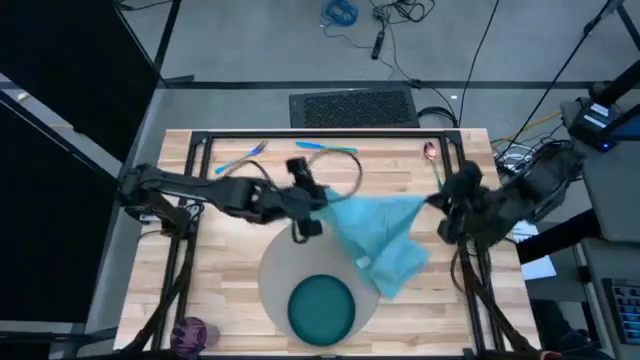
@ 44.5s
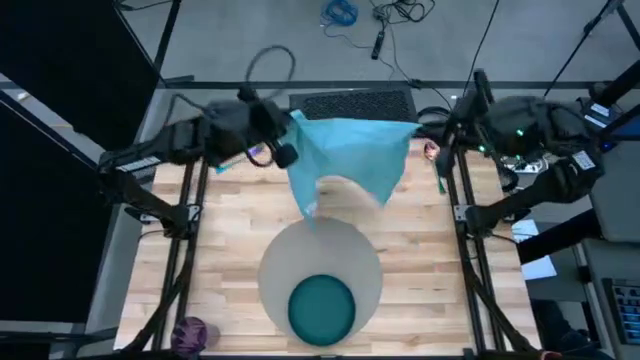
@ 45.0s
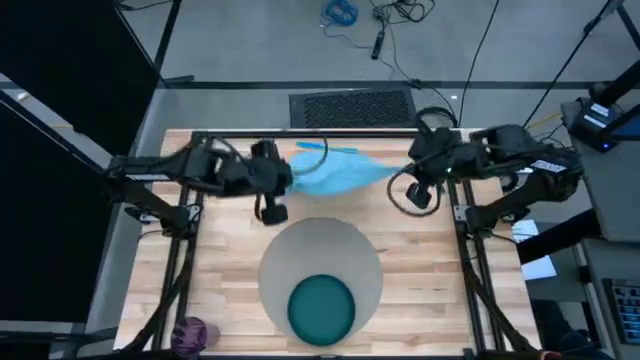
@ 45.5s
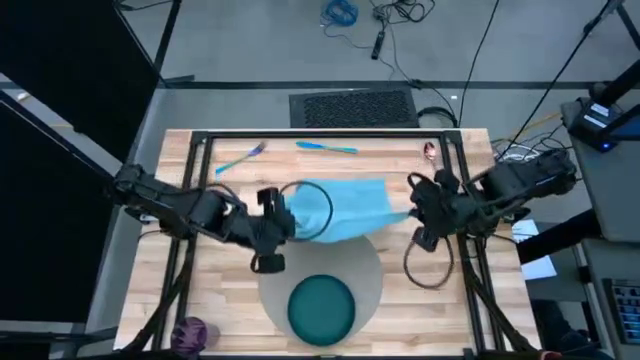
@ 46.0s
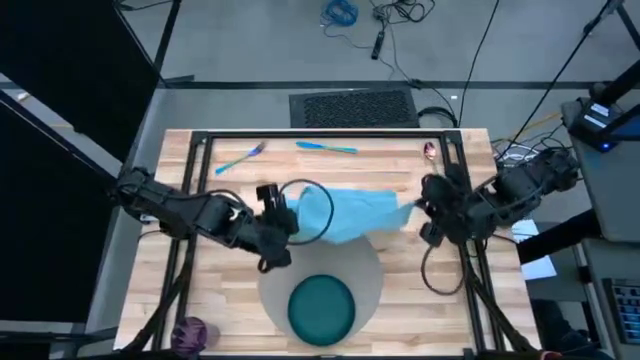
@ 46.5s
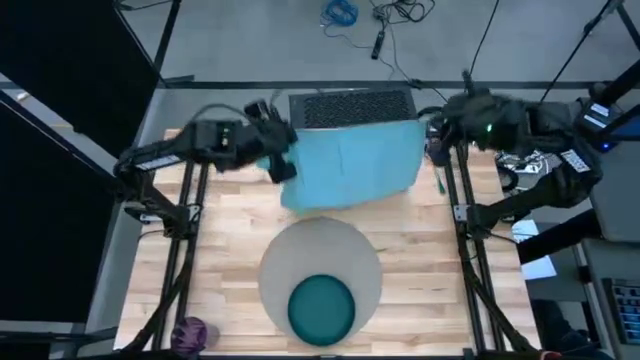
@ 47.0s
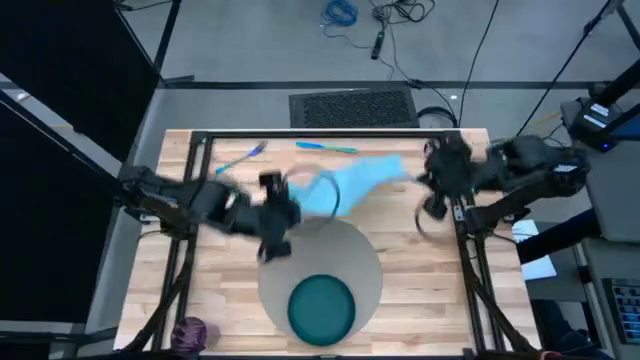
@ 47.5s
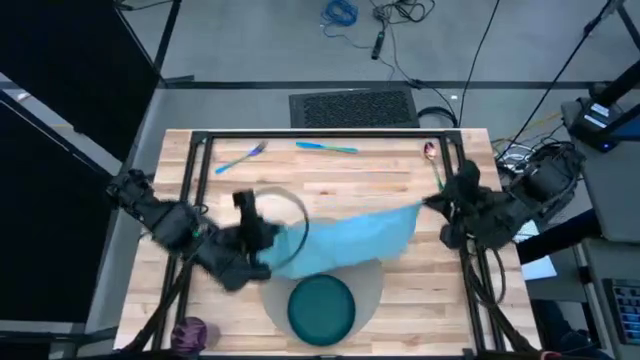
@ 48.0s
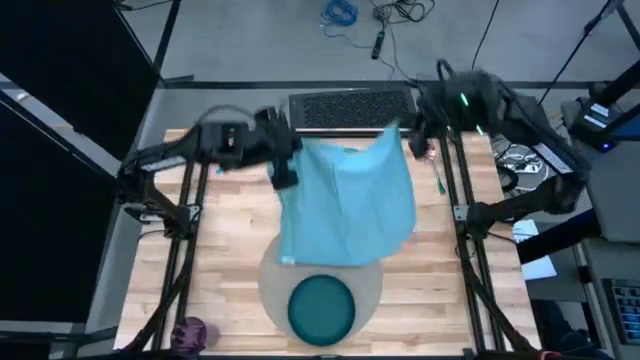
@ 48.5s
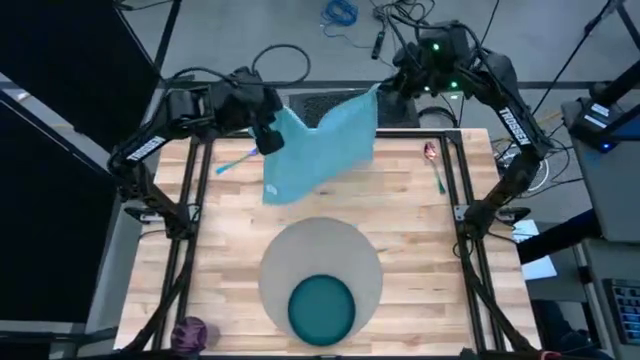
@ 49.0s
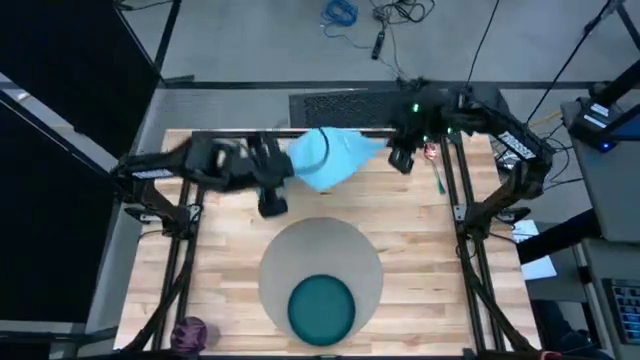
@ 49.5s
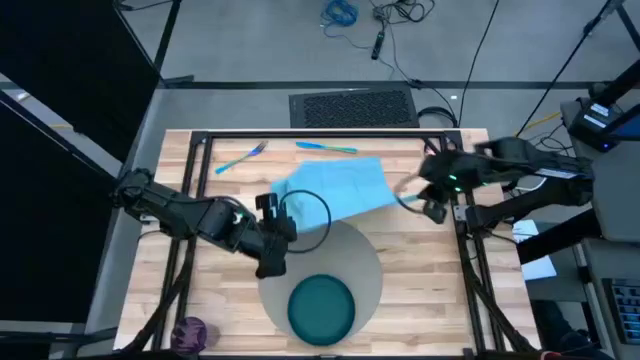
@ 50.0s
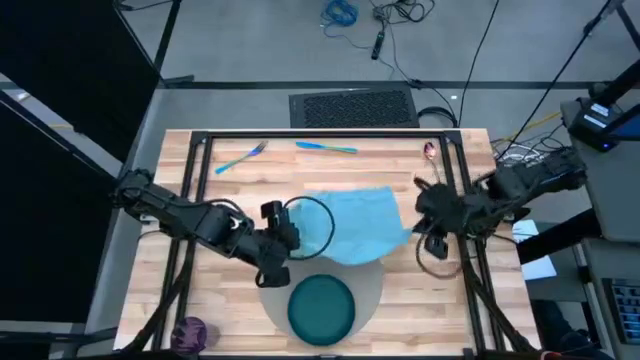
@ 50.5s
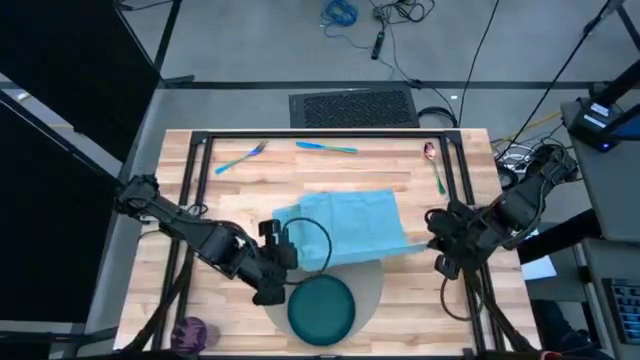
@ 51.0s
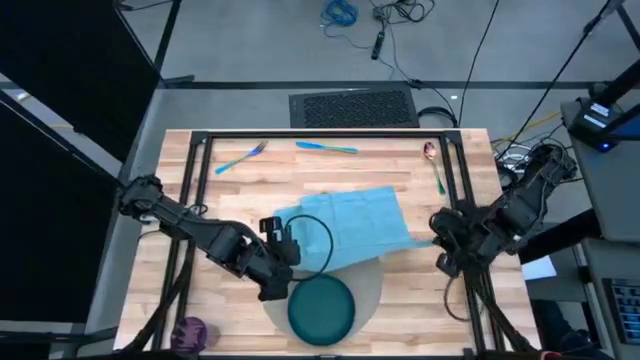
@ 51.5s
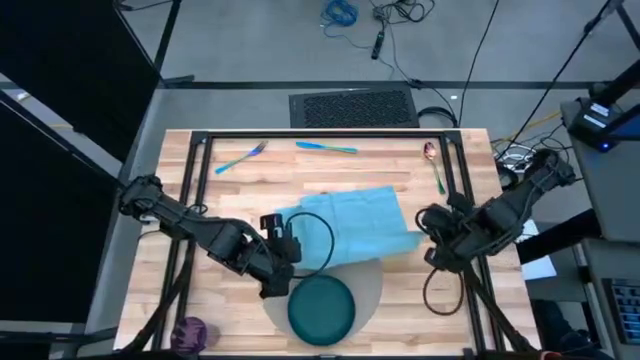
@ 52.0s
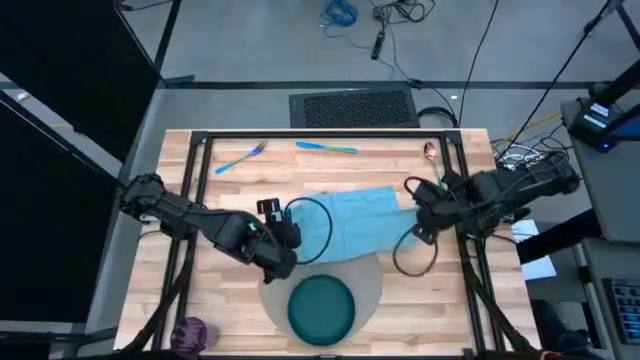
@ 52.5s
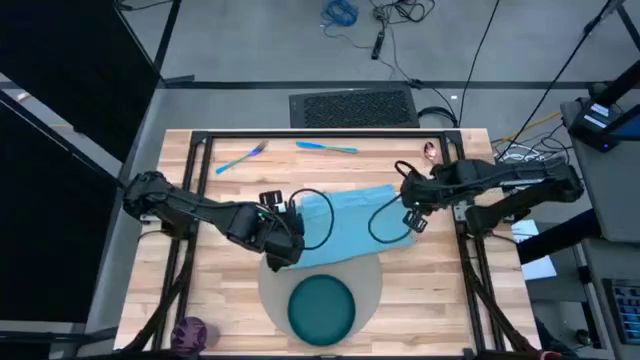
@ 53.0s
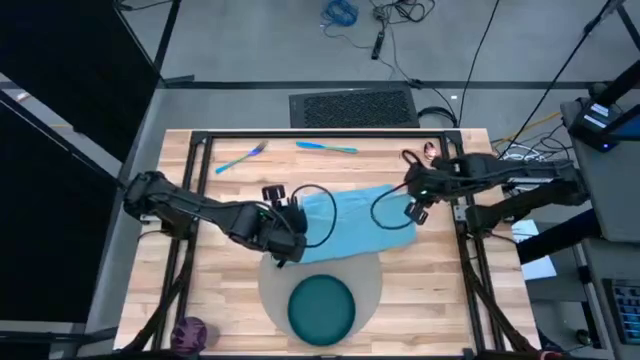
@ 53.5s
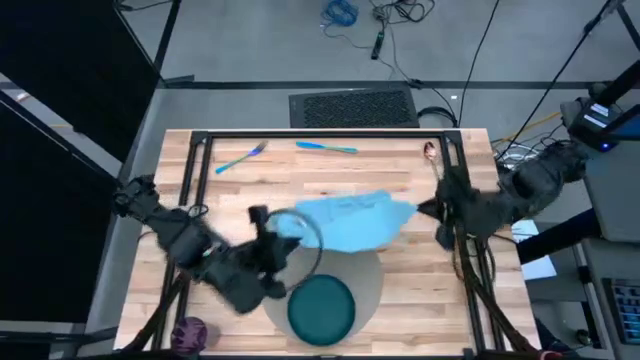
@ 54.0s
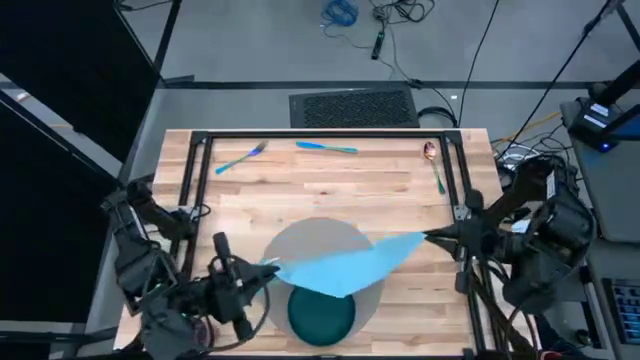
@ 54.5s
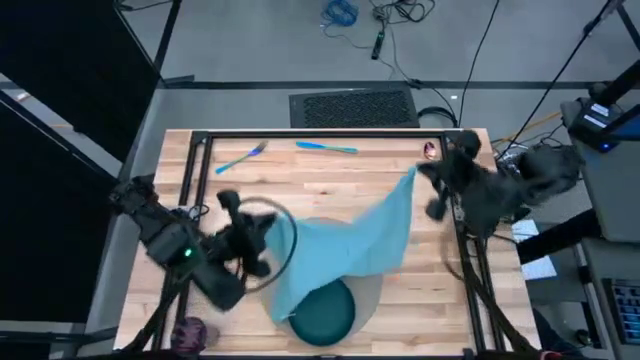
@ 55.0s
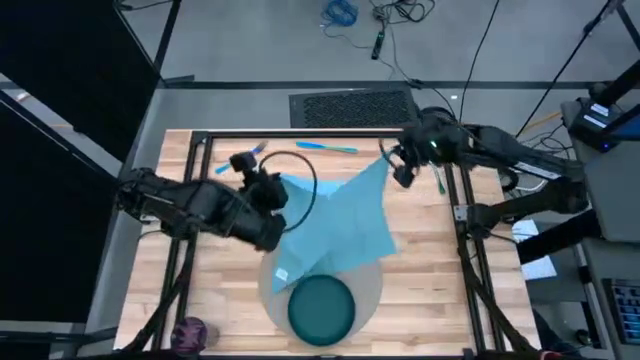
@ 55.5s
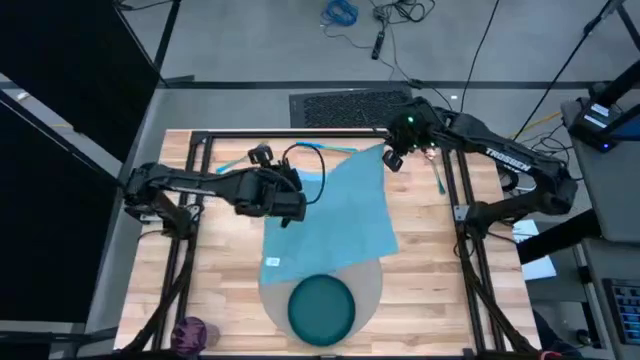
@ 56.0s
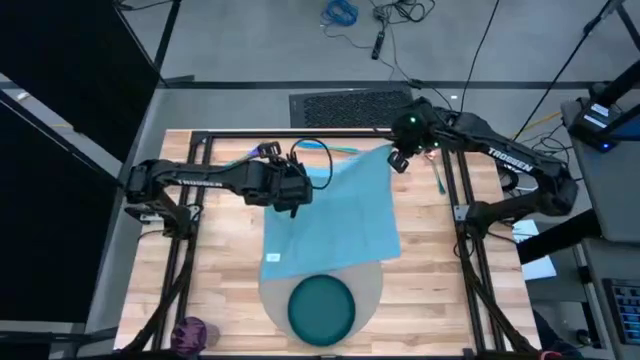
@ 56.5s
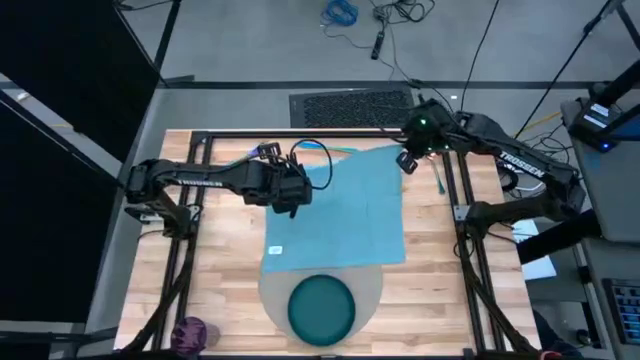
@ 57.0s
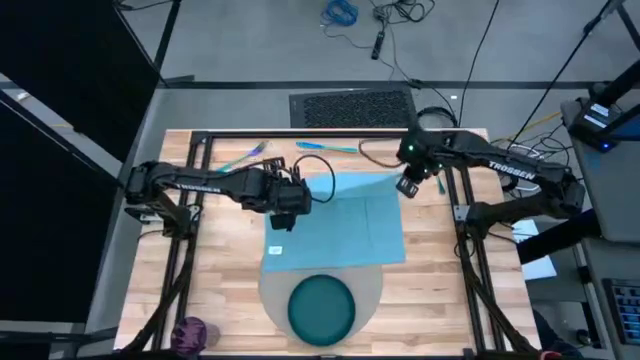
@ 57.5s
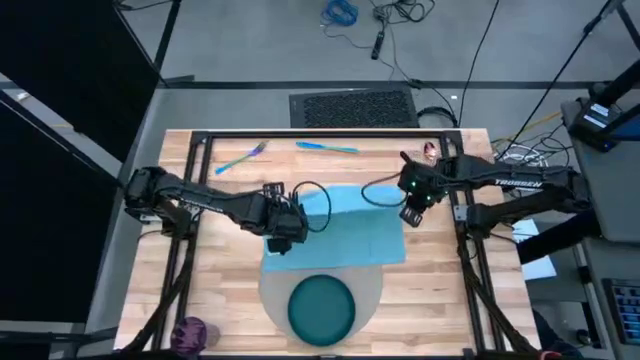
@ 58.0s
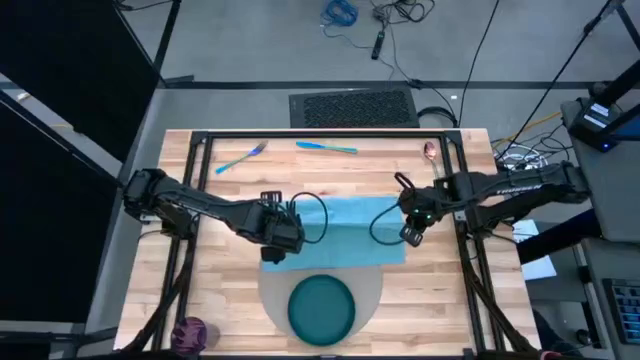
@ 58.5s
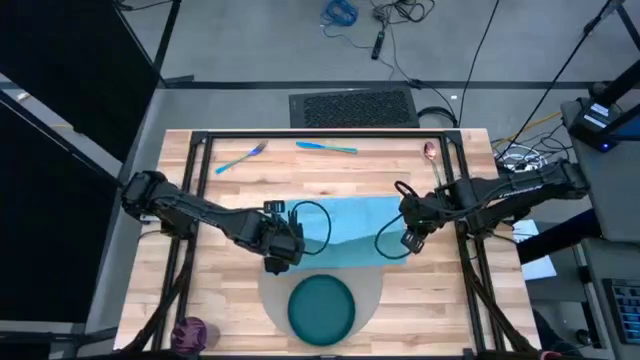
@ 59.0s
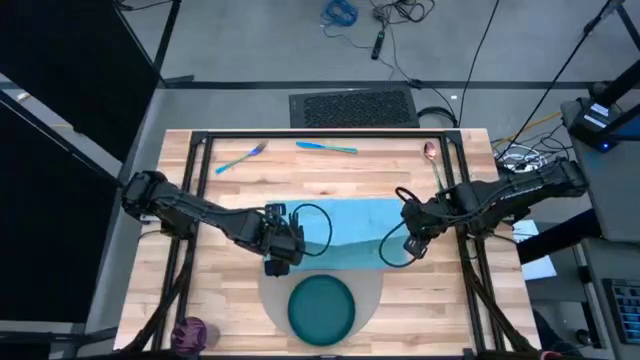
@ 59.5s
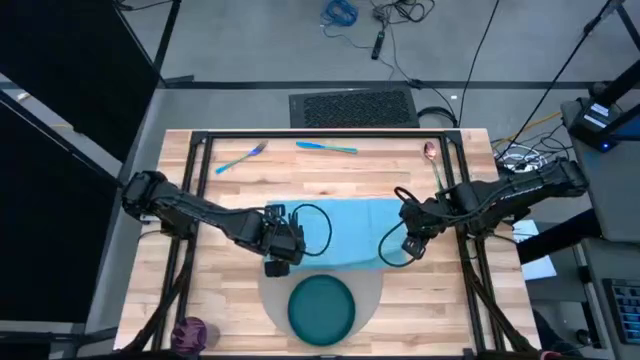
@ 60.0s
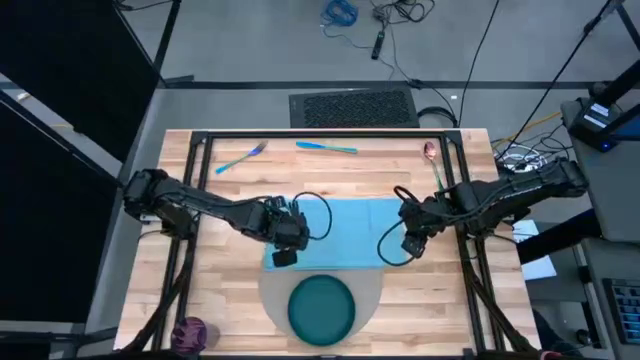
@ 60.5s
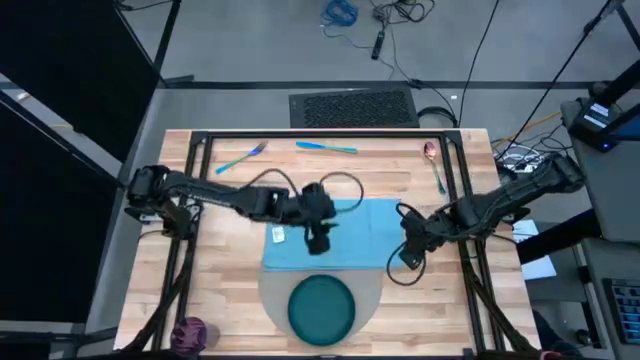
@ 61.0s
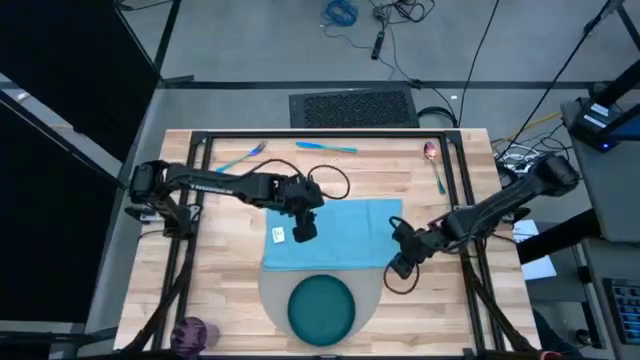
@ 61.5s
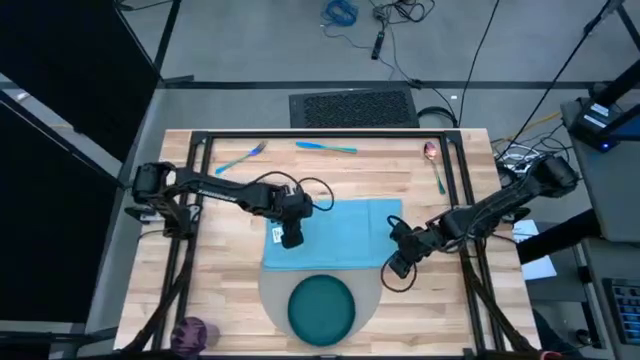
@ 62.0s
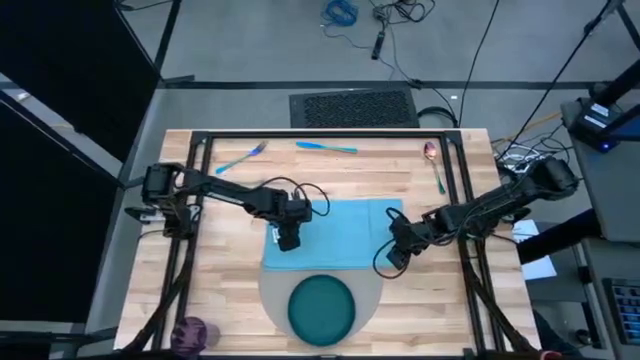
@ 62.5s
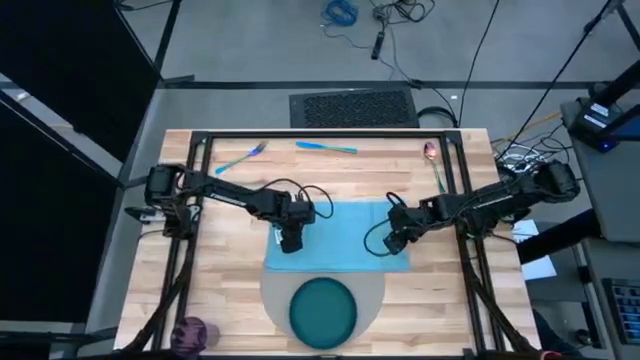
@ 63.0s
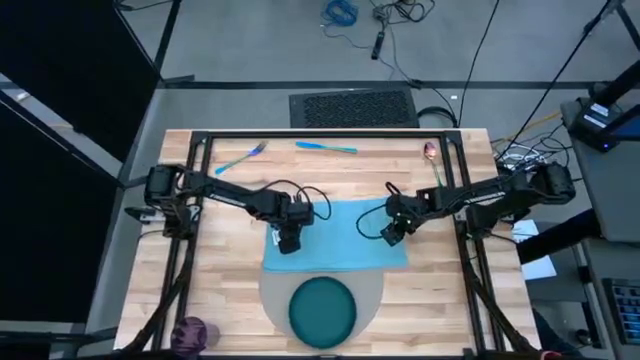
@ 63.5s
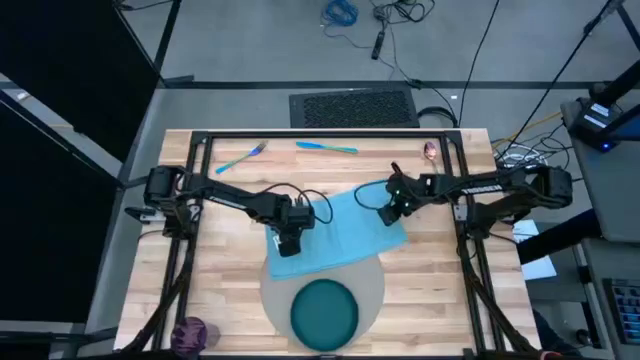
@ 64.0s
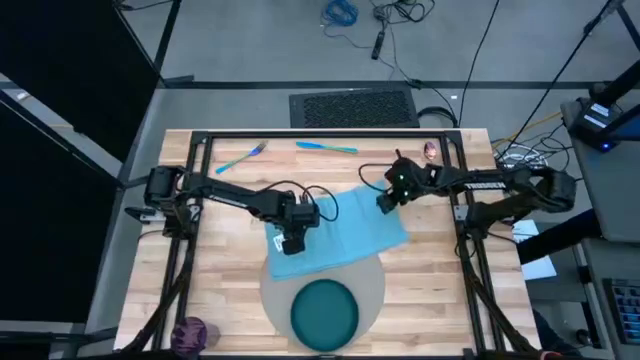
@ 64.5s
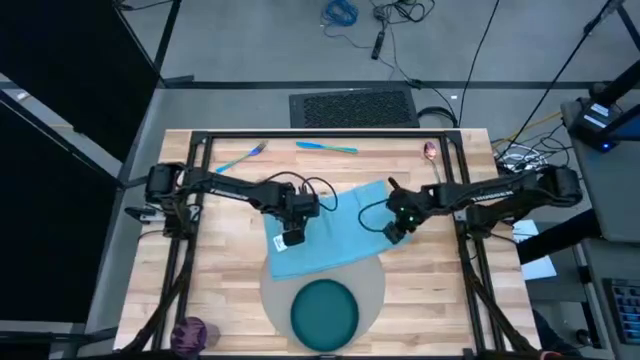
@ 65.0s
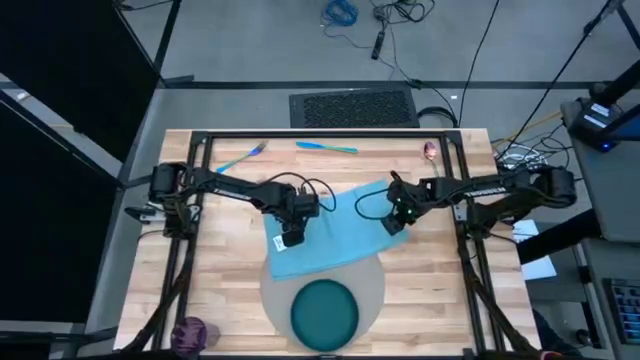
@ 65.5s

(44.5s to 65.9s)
Task: Set table place
Fold the blue napkin
